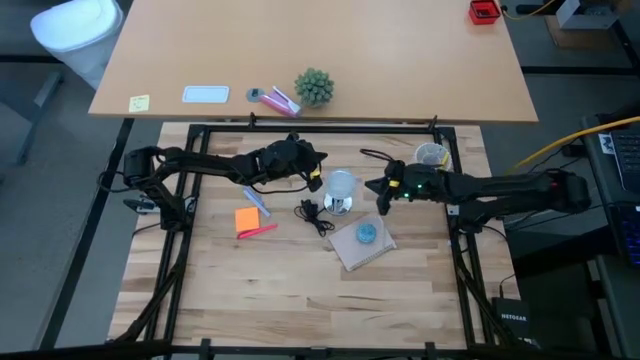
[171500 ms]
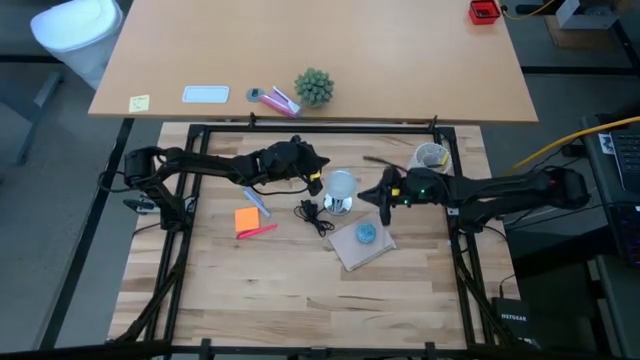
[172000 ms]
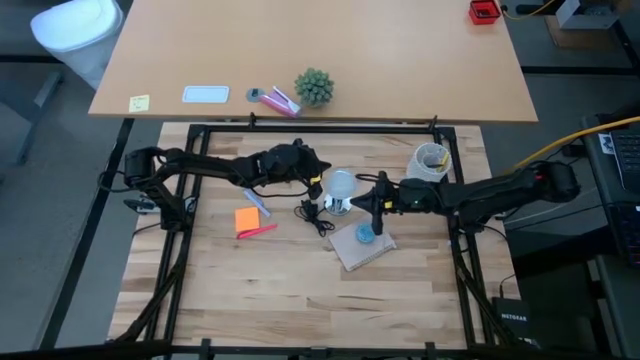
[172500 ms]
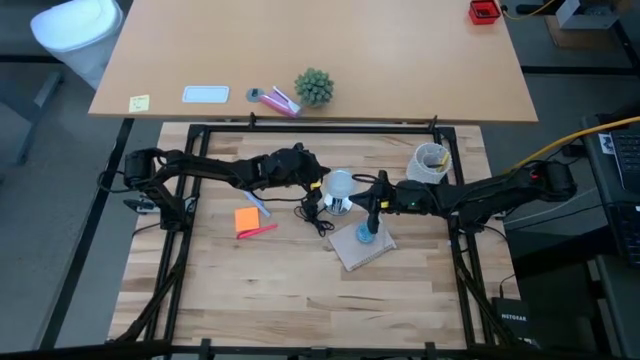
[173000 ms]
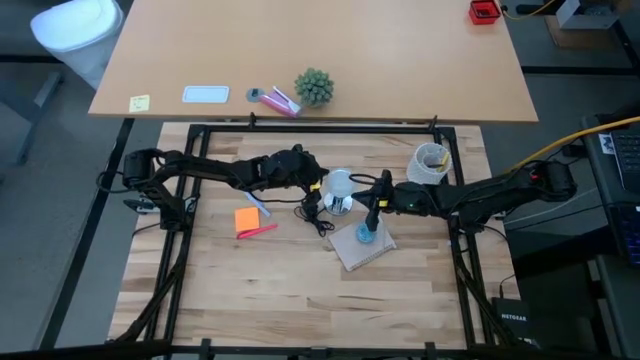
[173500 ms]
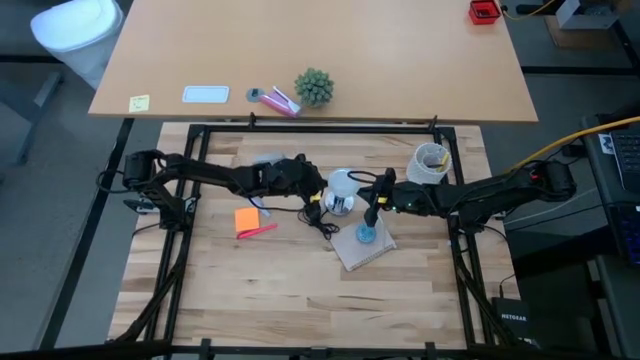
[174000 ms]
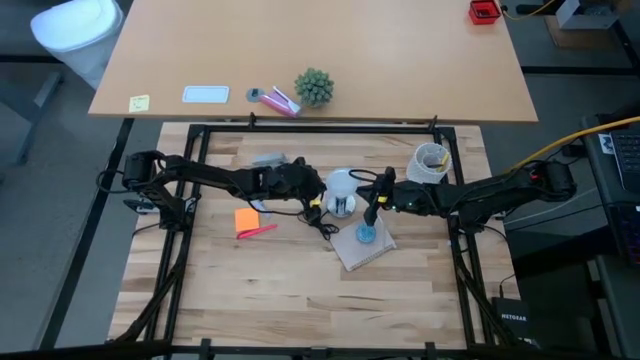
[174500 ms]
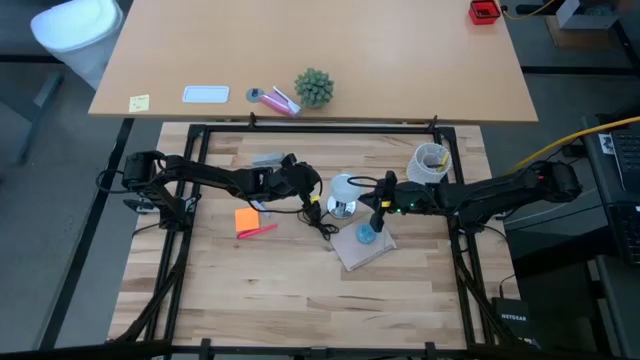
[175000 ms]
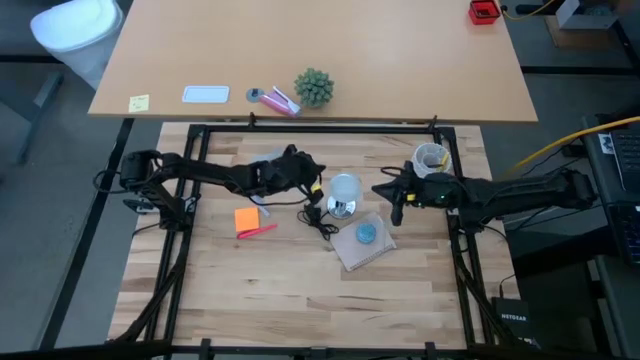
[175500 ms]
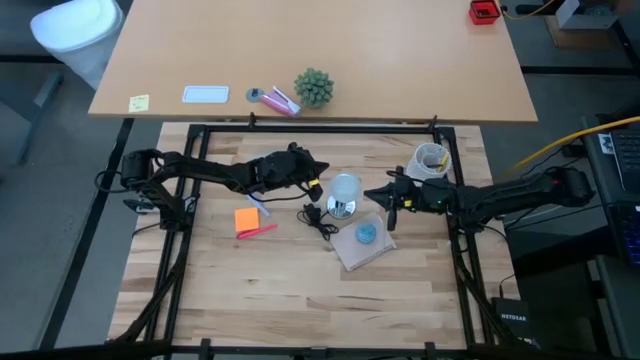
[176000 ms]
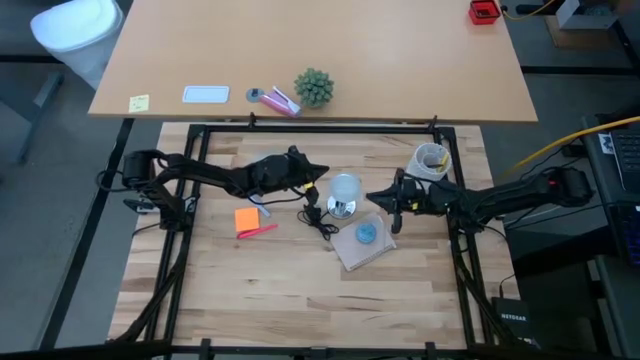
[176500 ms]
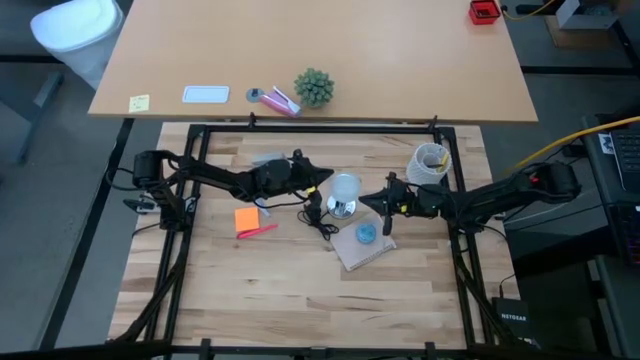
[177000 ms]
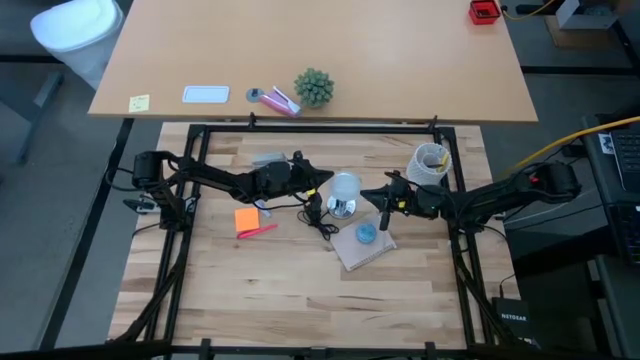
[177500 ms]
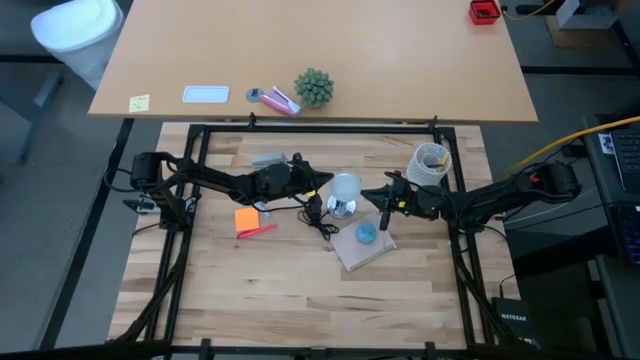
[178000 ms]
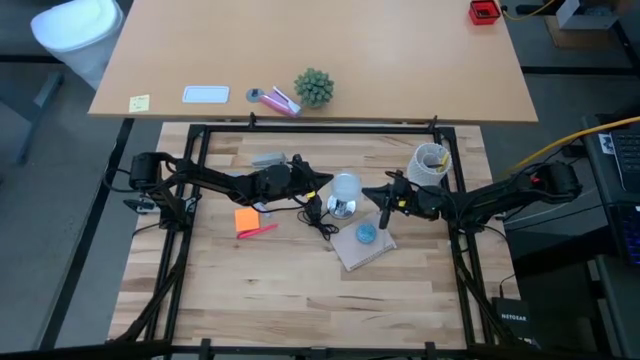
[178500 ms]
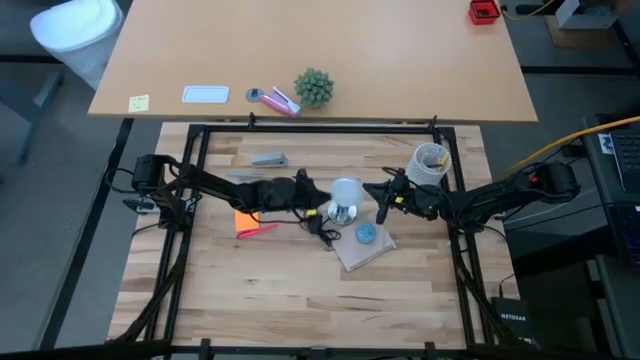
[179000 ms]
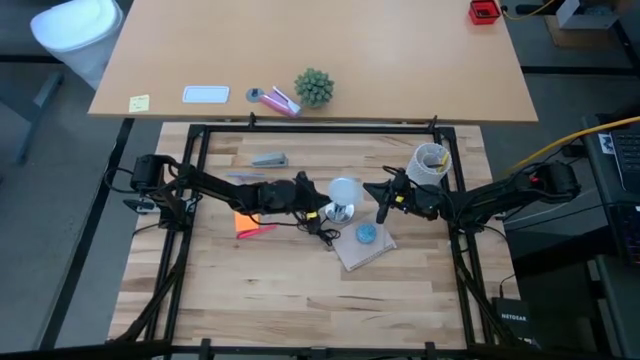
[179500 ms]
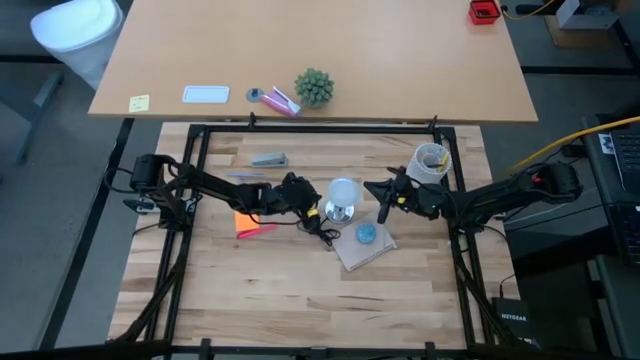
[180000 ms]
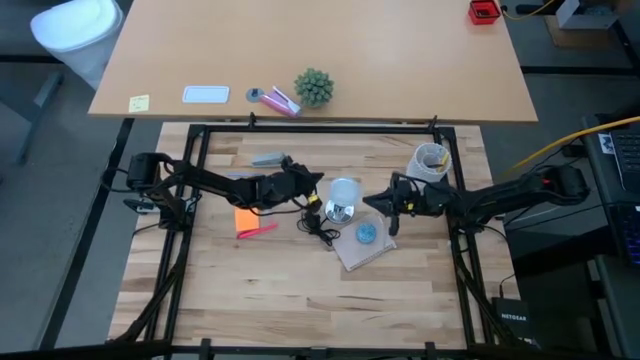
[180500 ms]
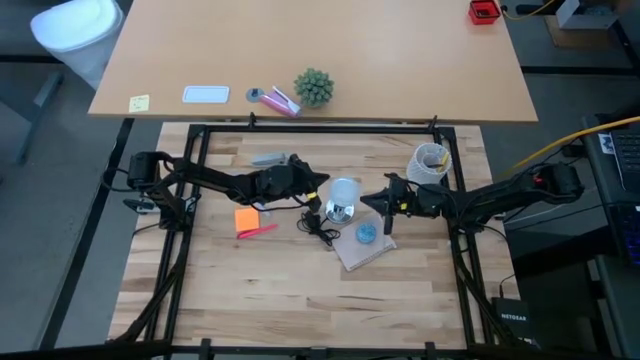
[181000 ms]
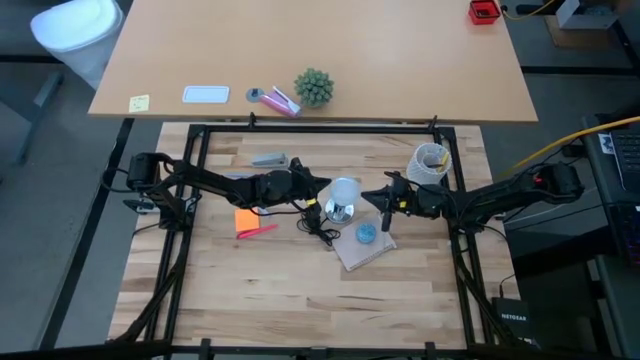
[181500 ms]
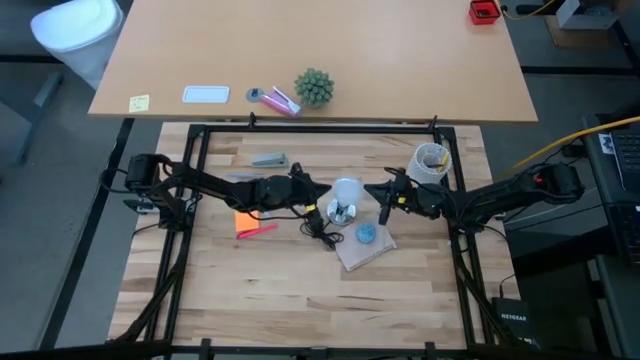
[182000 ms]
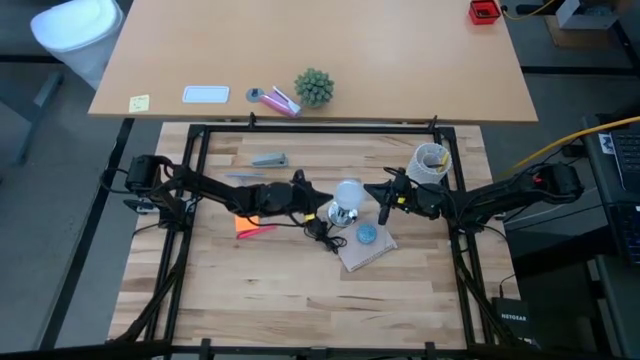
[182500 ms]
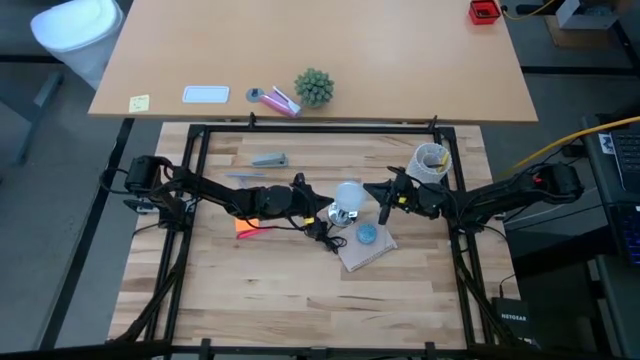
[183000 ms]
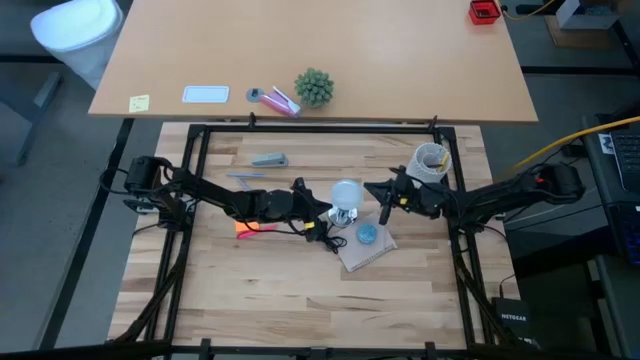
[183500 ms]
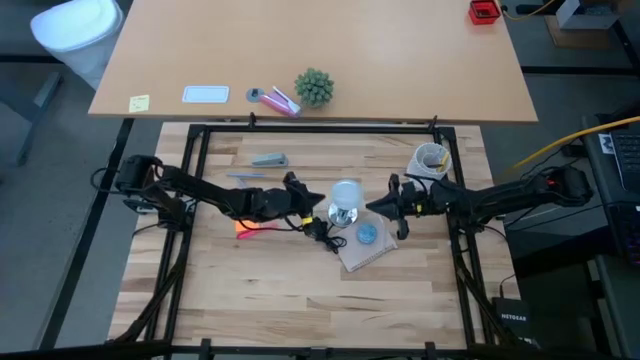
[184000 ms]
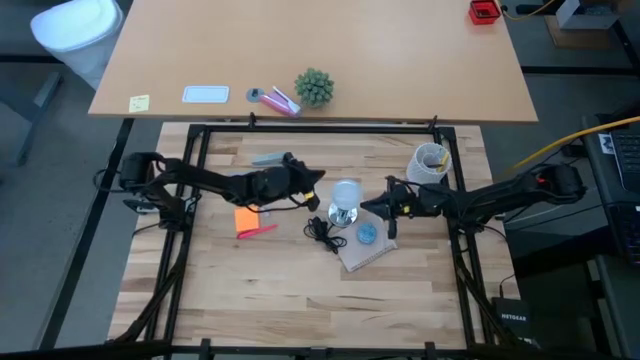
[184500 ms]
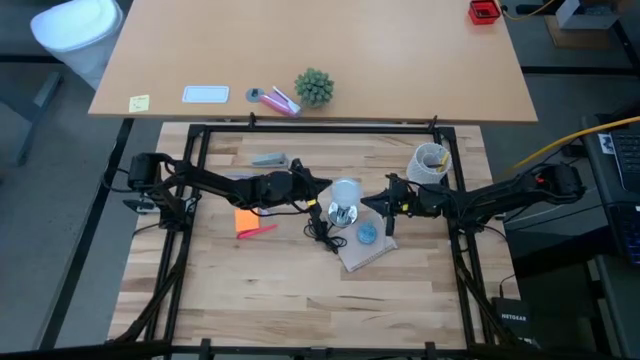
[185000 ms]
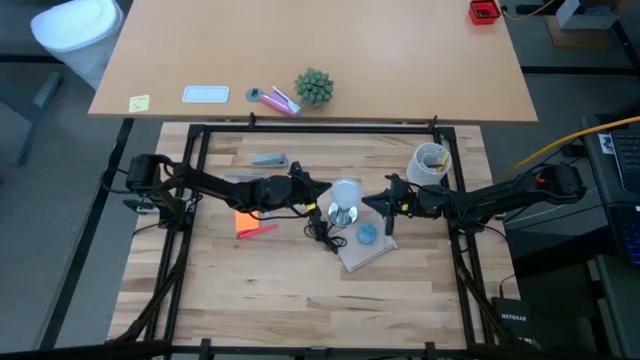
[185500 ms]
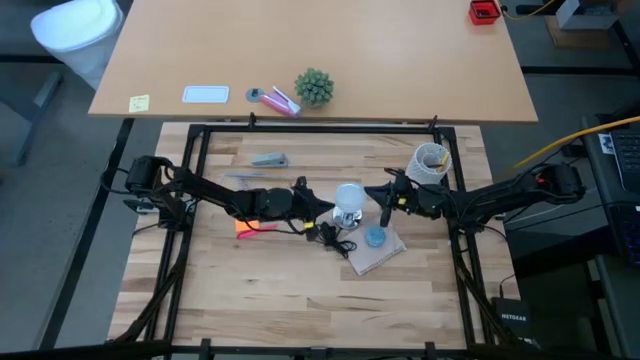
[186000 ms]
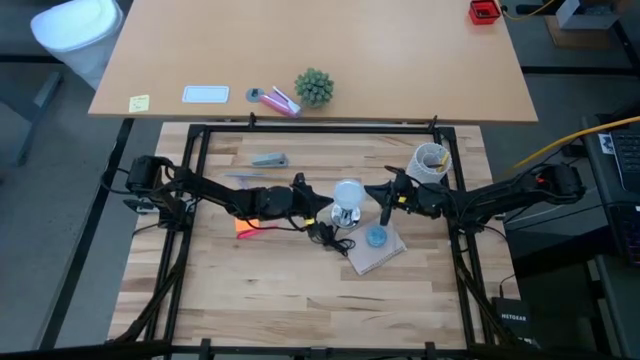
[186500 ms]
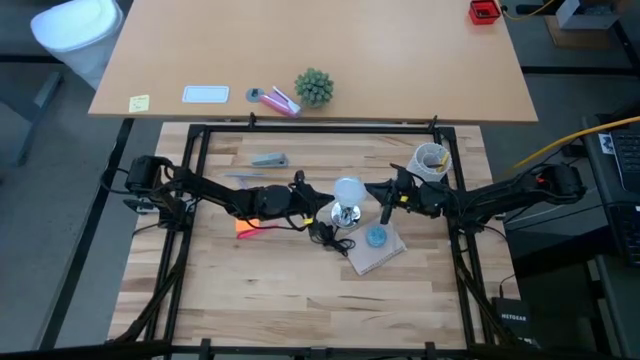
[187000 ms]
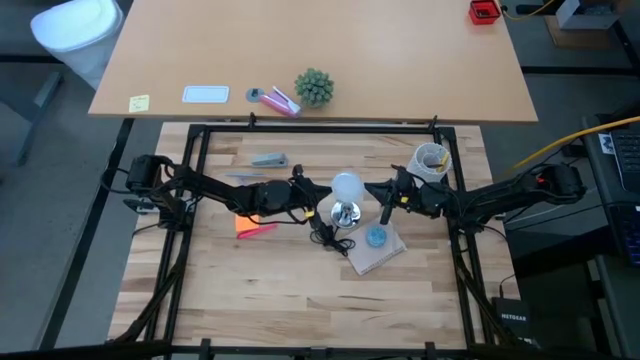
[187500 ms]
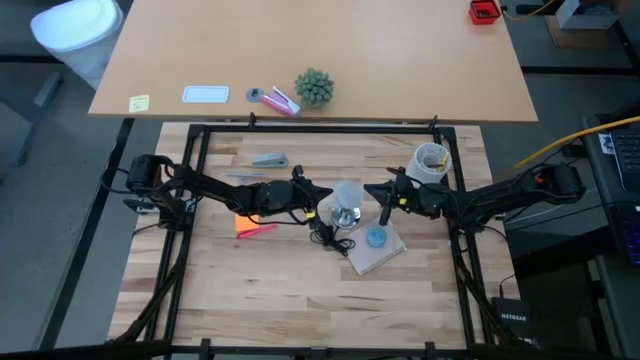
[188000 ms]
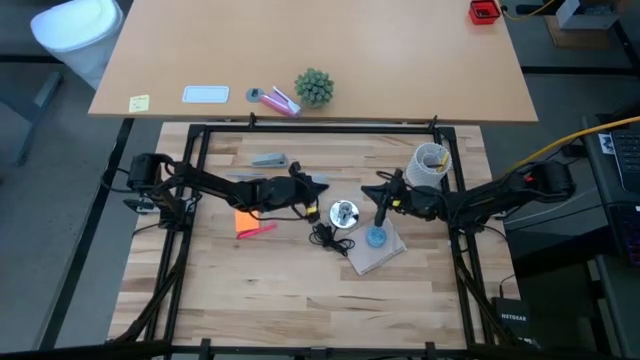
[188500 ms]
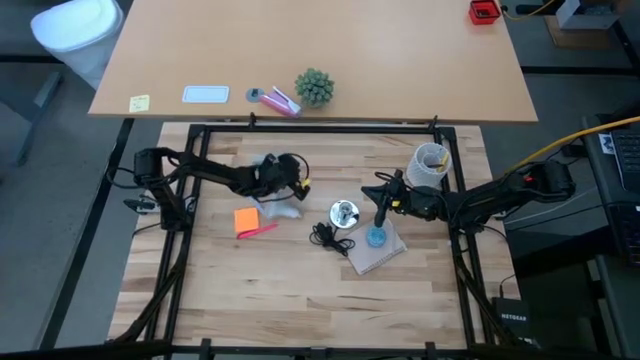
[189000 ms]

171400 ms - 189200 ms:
Task: Screw lightbulb
Remove the lightbulb from the lamp

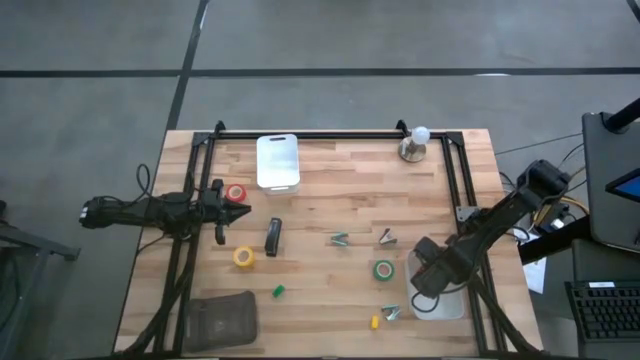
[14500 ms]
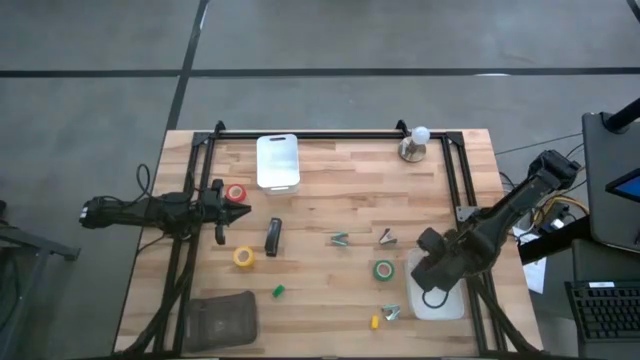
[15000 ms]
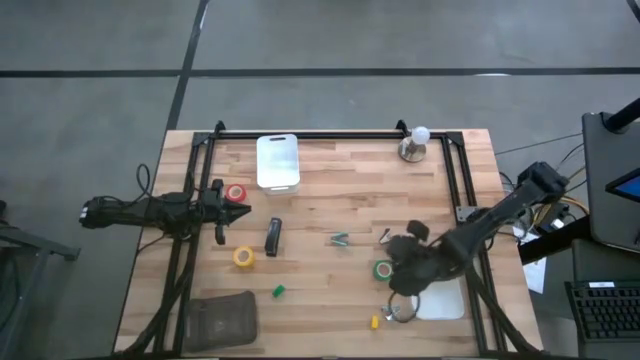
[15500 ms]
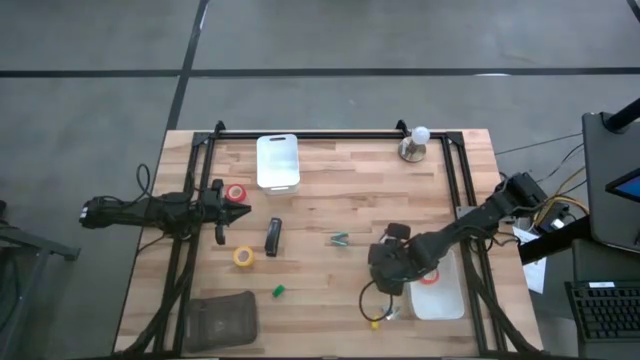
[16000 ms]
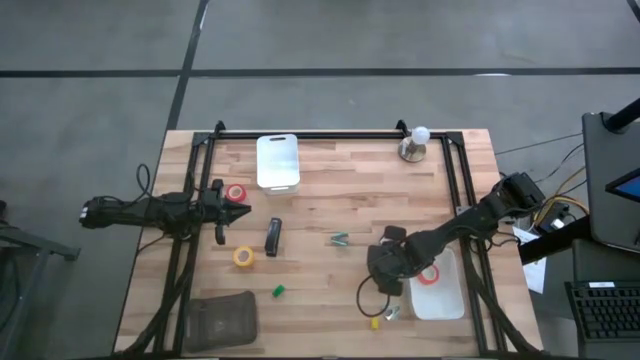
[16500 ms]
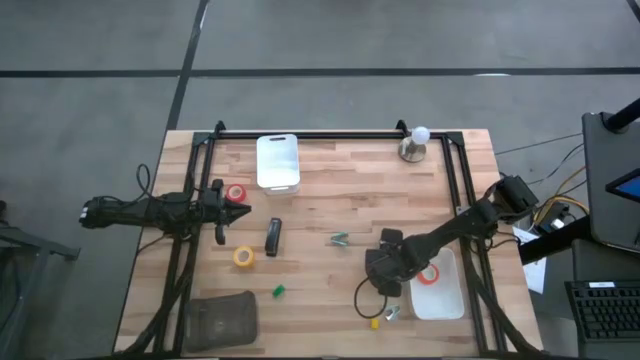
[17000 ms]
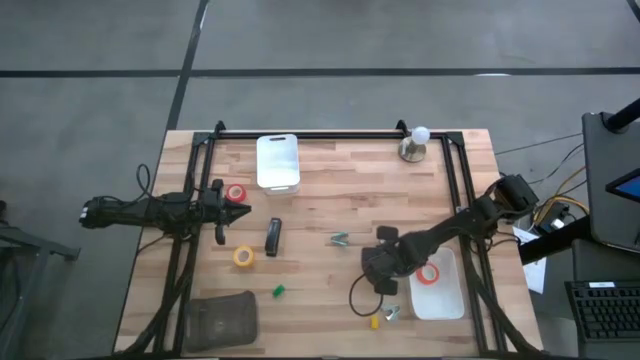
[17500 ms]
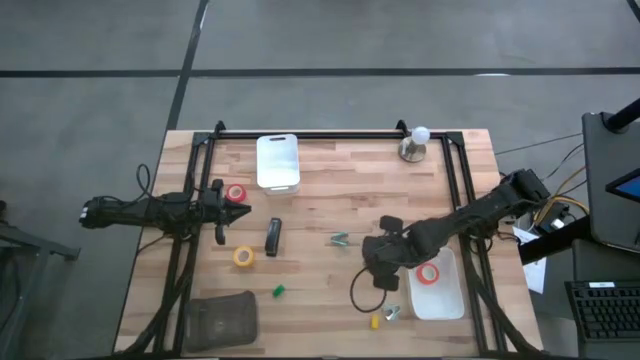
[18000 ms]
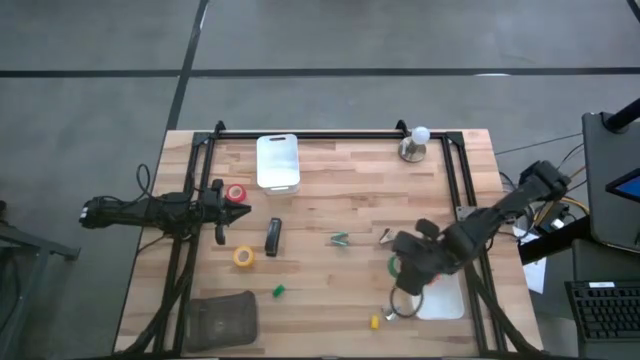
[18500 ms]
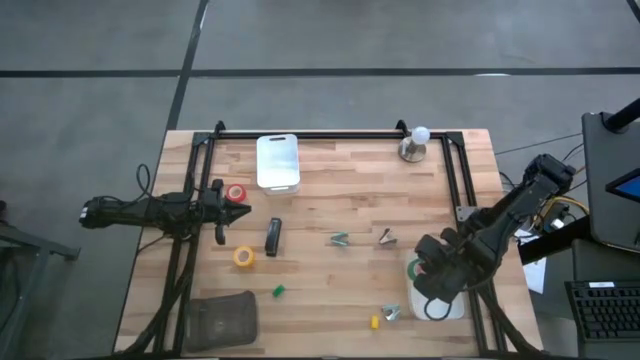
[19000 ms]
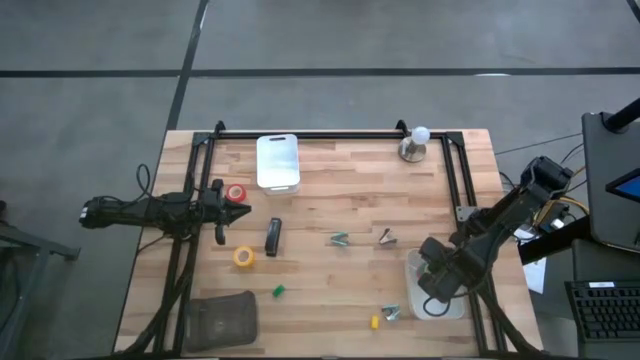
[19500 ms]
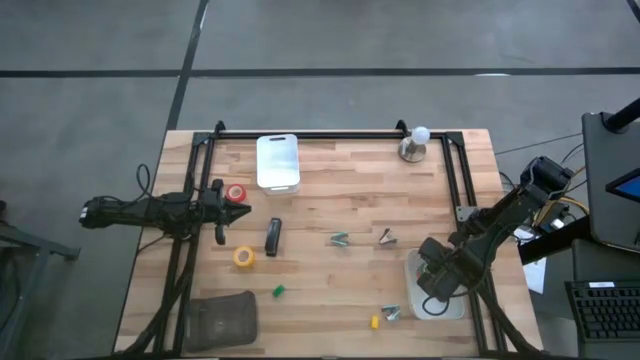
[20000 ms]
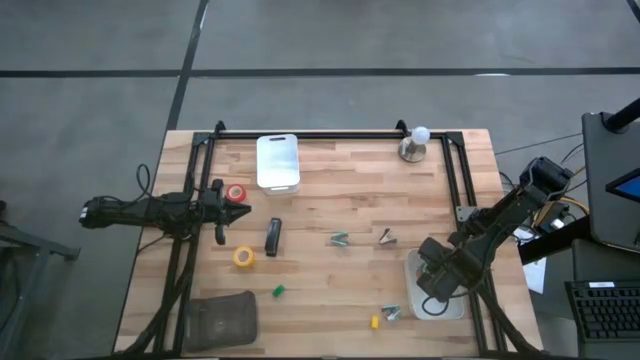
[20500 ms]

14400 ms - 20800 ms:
Task: Pick and place Stapler, Stapler remover, tape
Put the green tape into the bottom white bin
